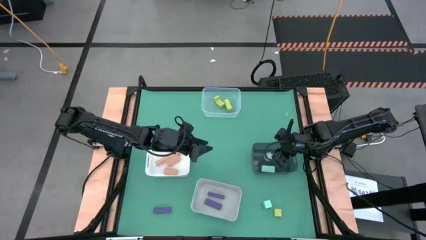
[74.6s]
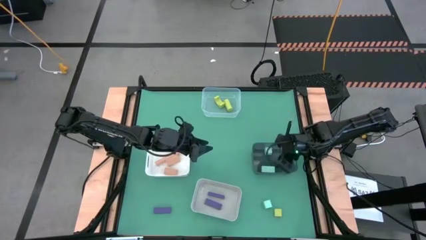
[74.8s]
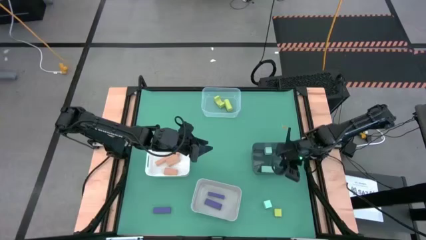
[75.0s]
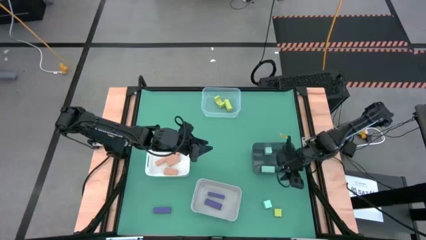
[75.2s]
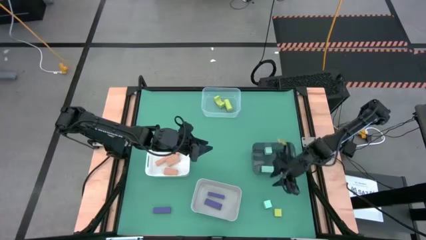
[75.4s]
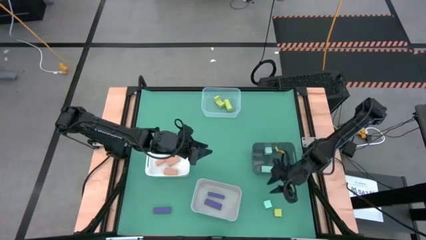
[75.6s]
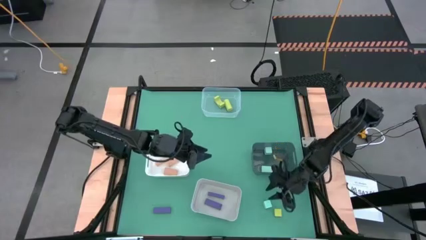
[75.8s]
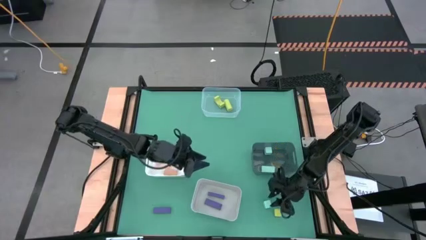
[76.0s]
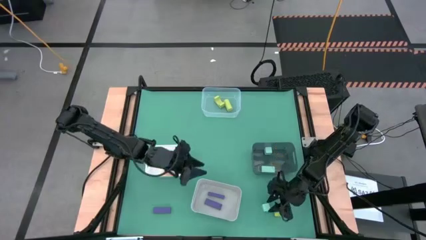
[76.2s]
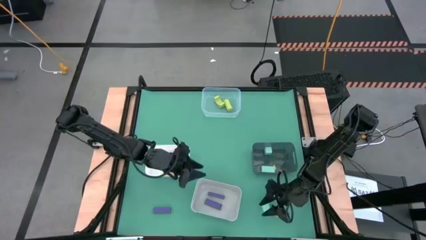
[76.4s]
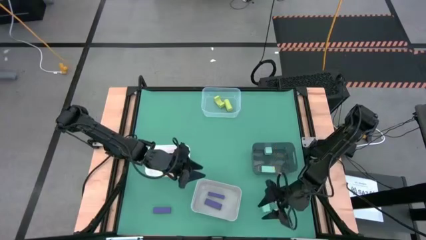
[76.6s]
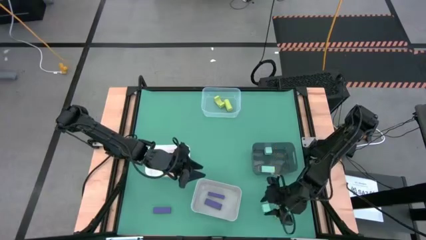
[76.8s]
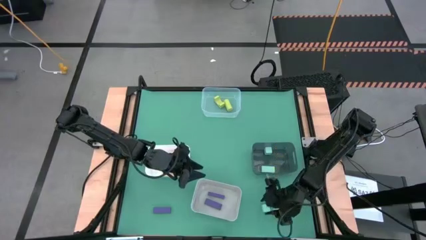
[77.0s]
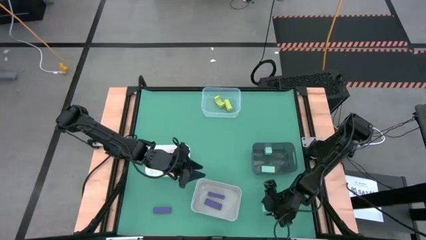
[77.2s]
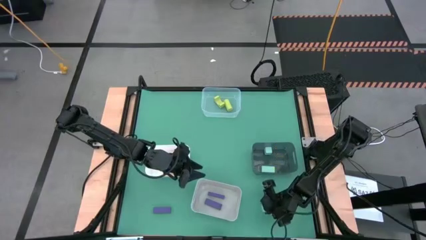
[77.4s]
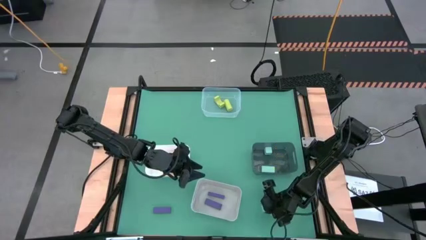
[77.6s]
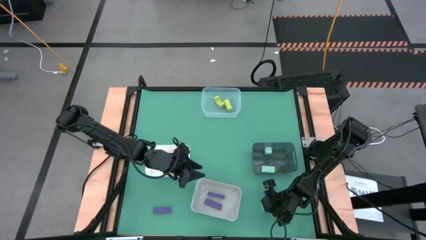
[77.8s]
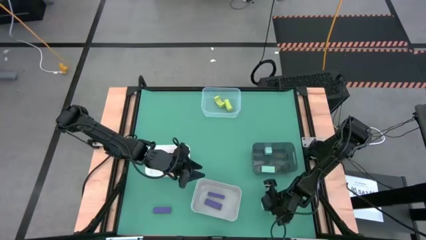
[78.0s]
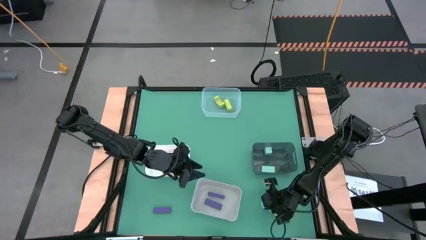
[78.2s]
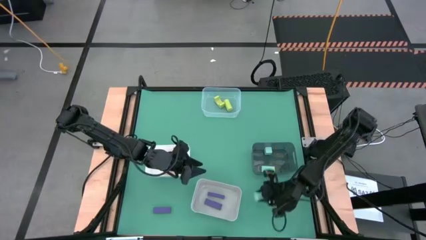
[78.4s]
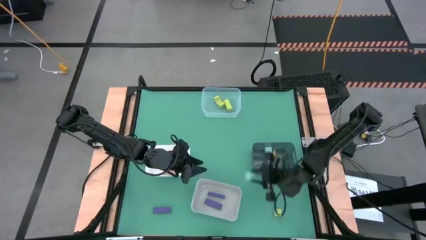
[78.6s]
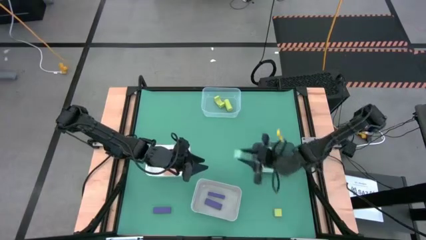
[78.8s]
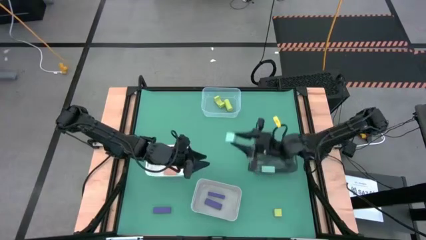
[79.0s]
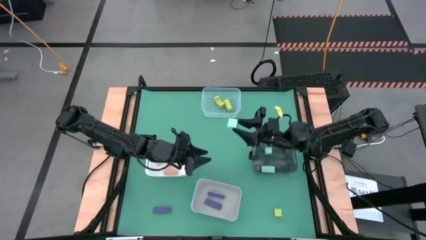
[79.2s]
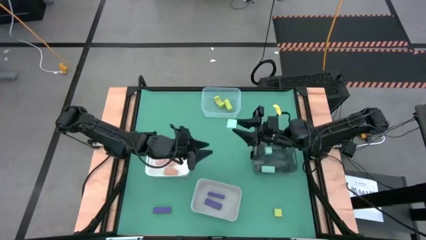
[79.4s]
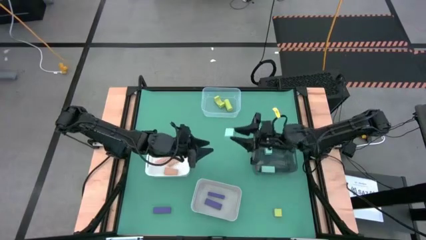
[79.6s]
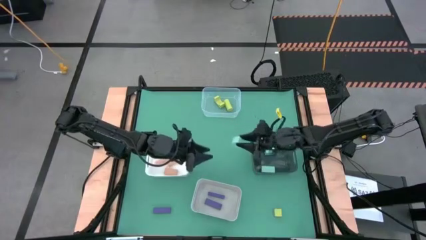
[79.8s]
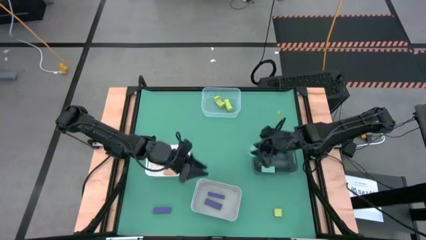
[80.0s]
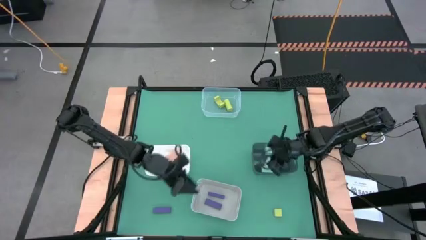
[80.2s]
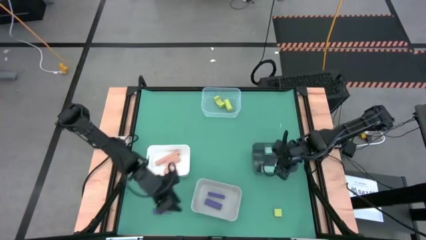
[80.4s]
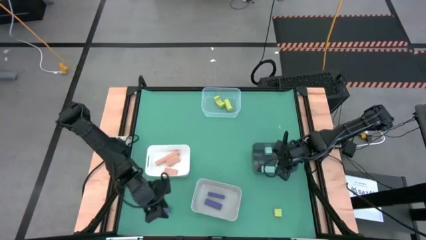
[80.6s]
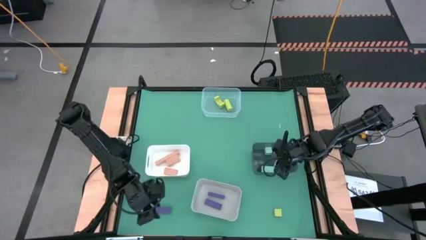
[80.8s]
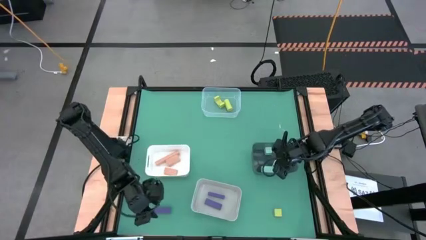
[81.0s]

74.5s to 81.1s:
Task: Sort & place blocks by color
Put the light blue block into the black bin

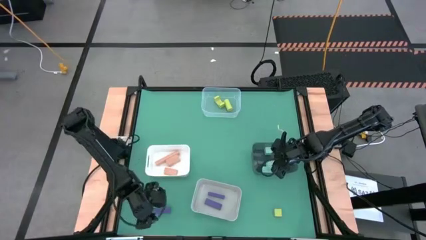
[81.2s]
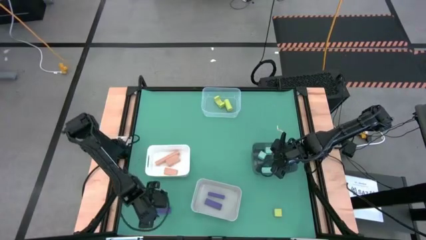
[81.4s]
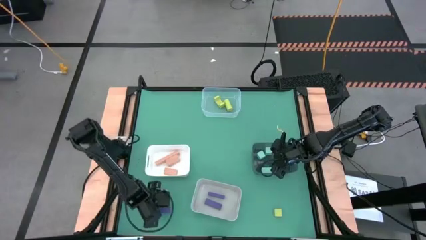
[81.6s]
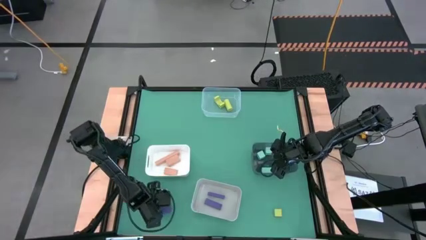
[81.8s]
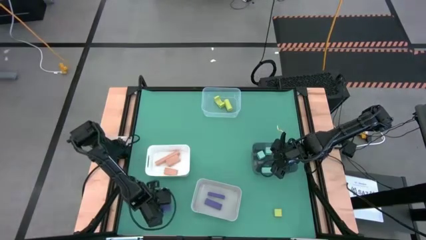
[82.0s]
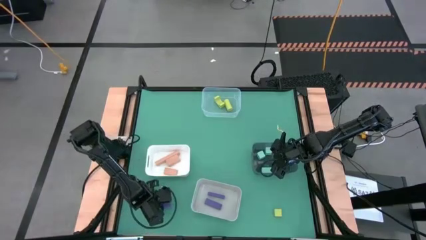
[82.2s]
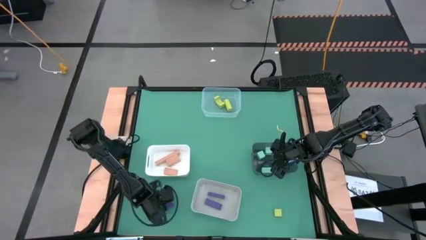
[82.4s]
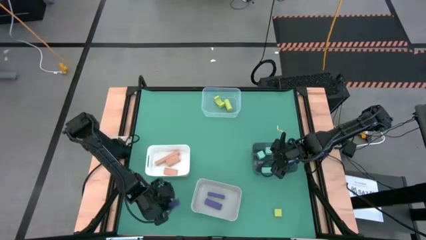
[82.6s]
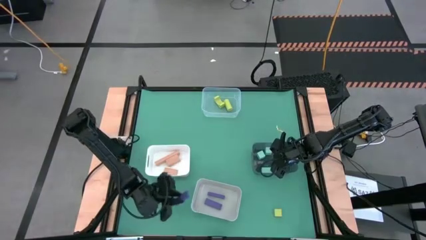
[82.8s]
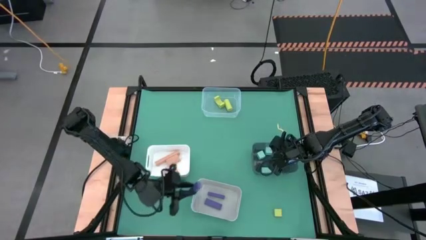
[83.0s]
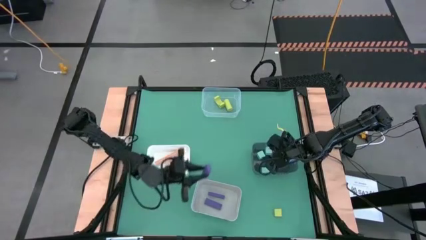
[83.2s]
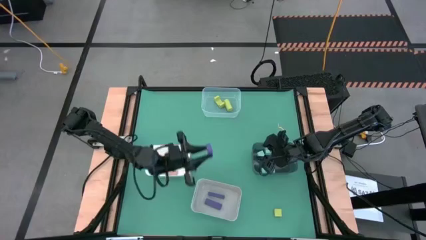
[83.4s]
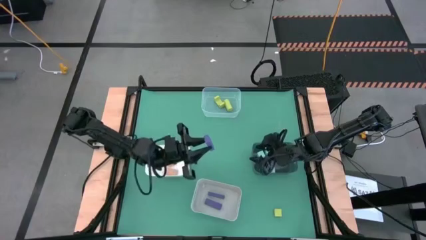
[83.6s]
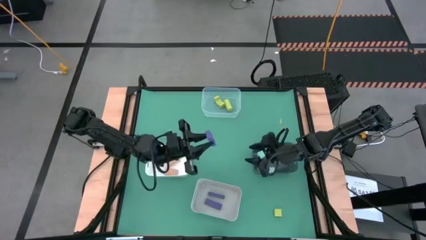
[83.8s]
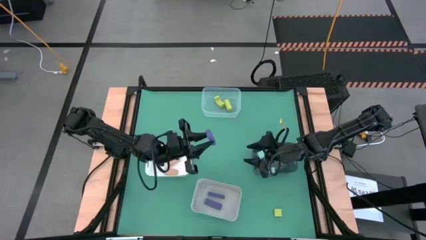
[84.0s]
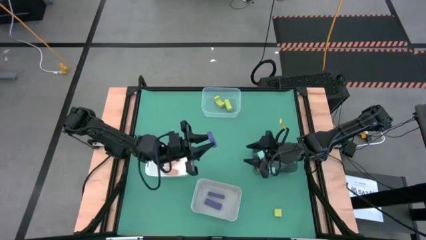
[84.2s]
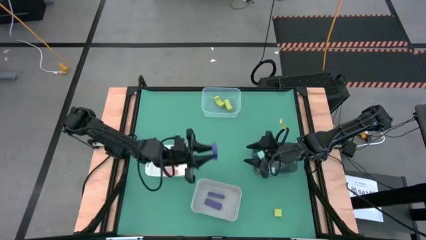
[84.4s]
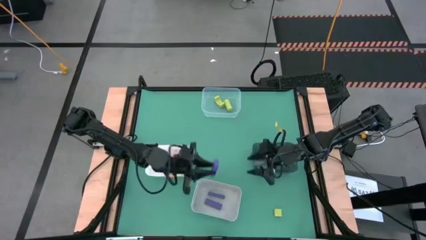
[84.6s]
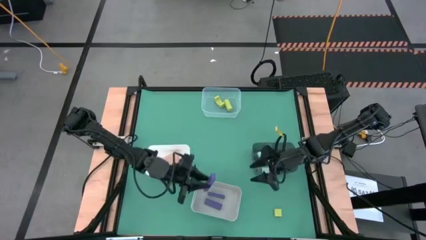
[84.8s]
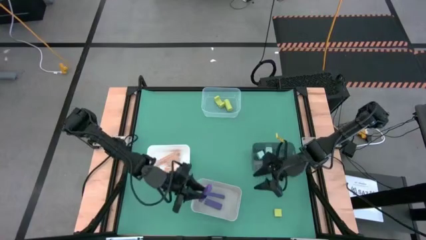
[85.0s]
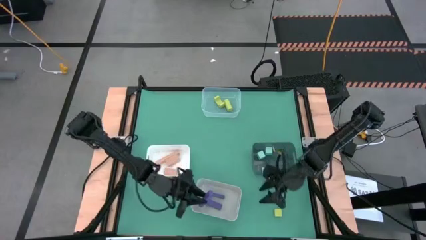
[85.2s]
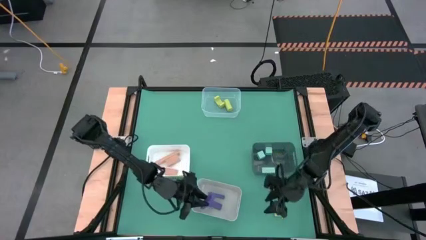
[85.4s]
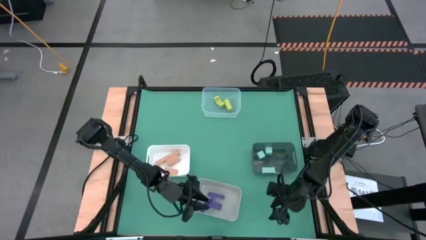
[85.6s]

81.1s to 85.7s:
Put the purple block into the gray bin

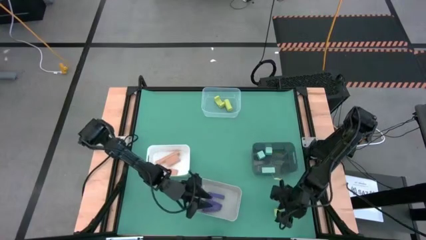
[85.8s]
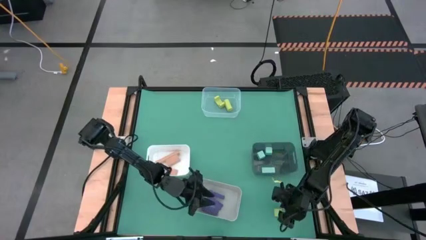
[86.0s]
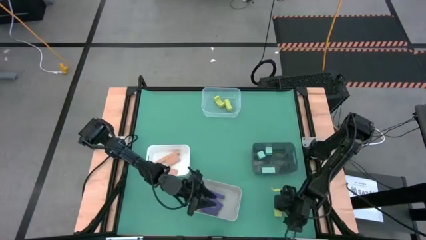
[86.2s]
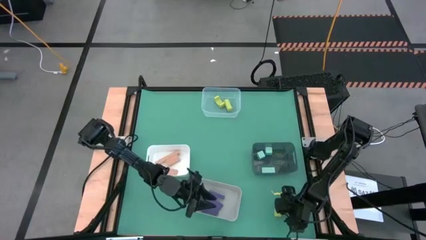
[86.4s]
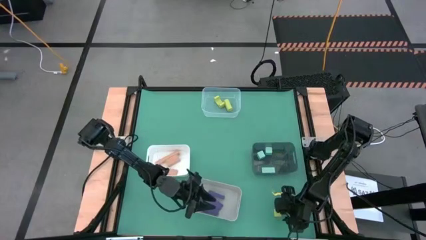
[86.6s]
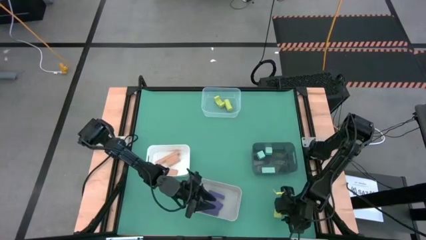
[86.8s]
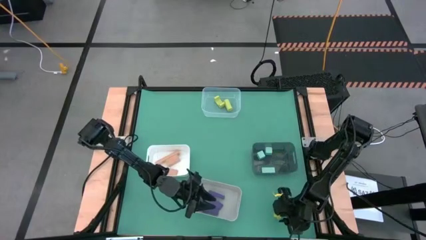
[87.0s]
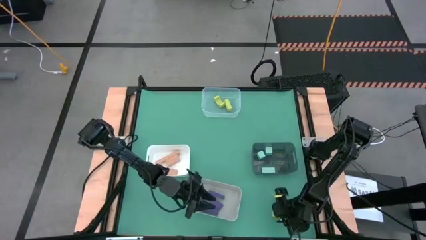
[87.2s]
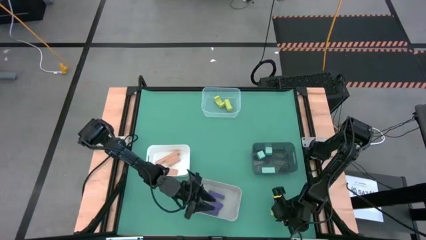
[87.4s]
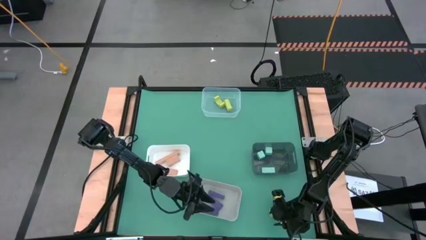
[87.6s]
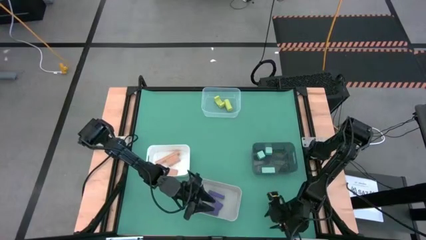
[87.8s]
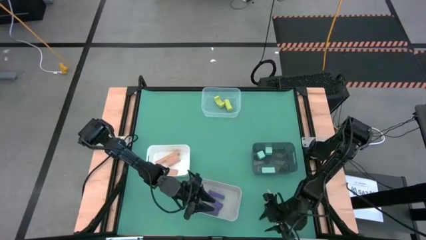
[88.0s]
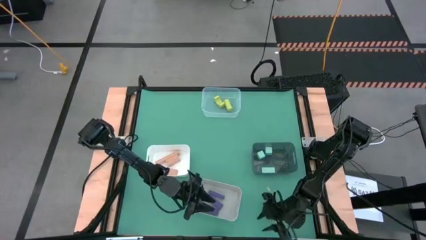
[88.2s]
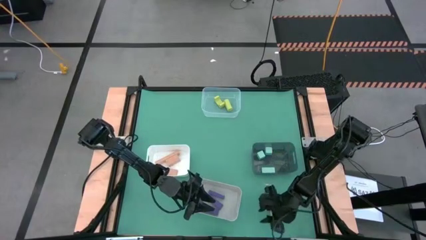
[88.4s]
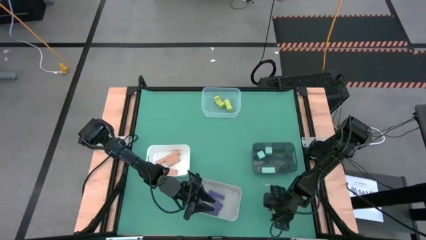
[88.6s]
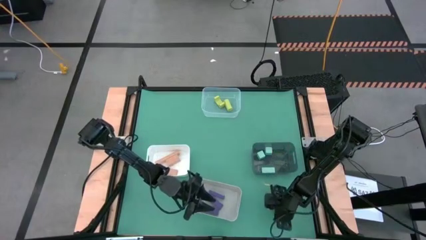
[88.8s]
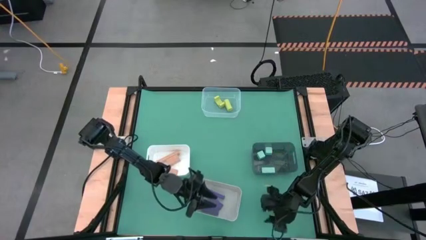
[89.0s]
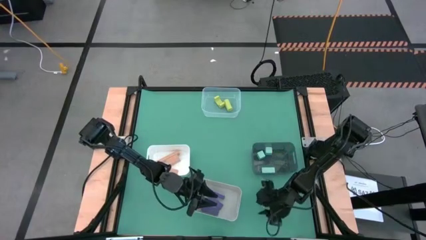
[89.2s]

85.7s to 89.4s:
Put the green block into the transparent bin

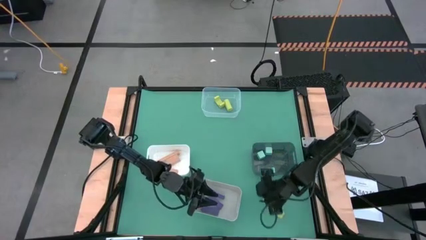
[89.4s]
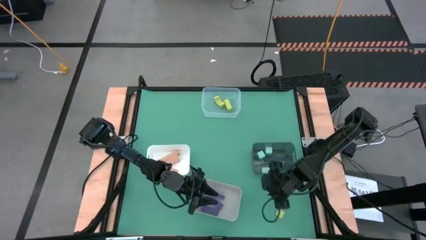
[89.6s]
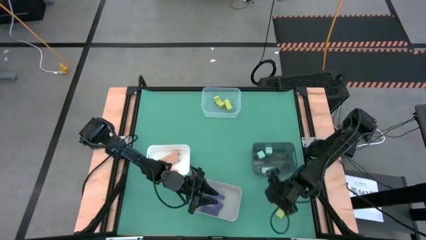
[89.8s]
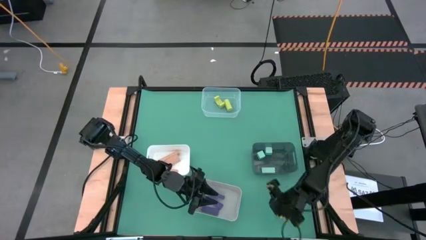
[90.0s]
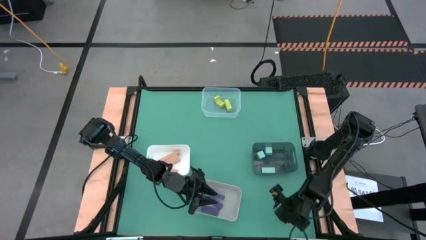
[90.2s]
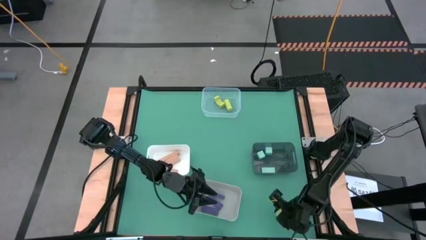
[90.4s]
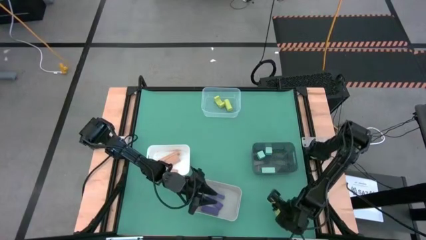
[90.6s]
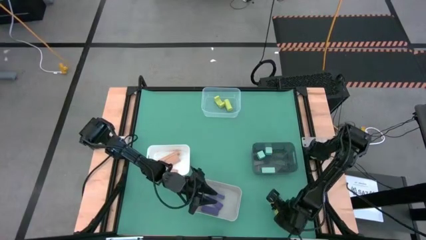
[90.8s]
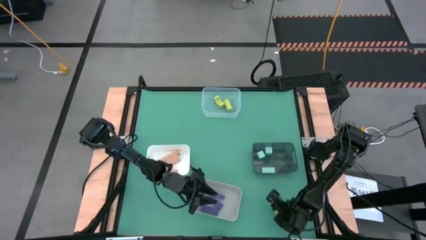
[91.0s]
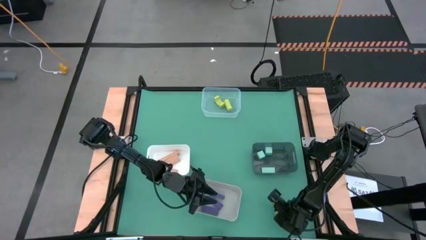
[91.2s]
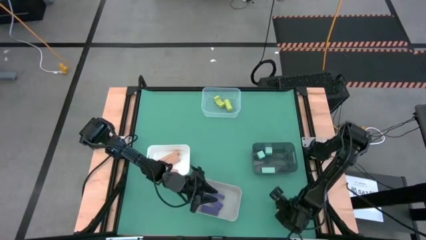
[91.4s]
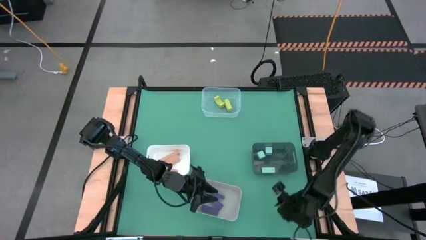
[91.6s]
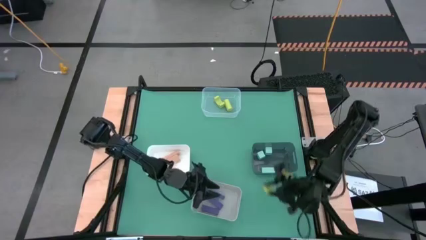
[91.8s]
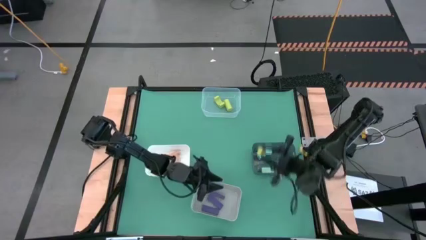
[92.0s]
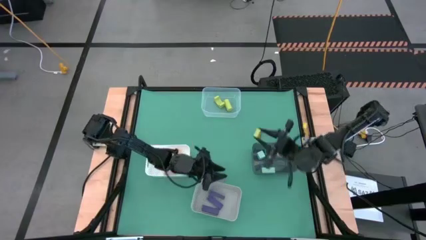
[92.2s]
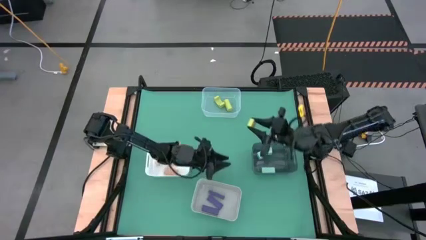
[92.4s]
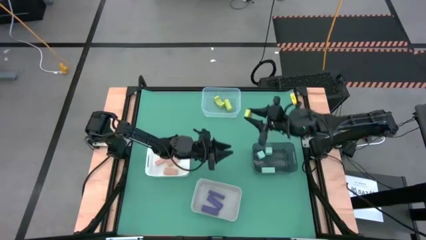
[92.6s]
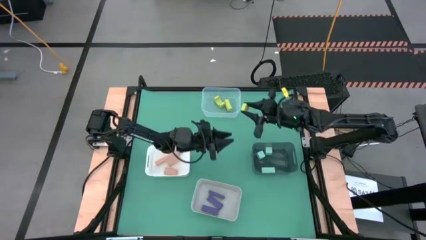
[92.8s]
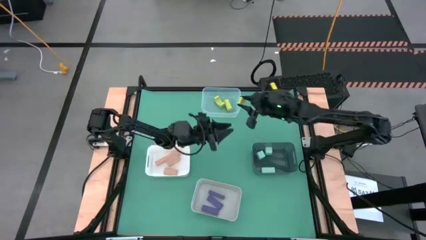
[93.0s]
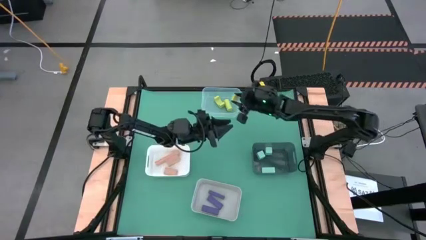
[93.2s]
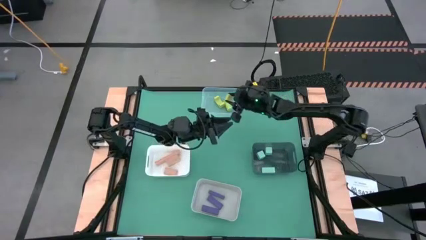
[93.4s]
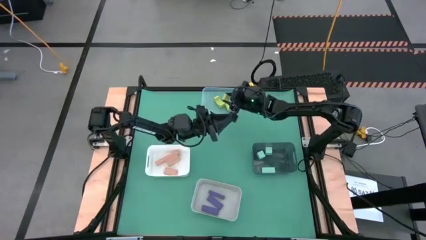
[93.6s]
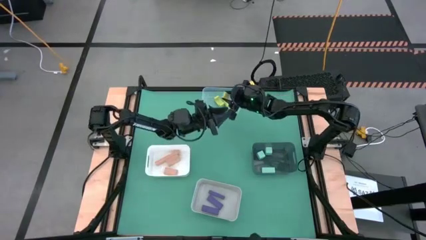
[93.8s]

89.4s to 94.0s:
Put the green block into the transparent bin
